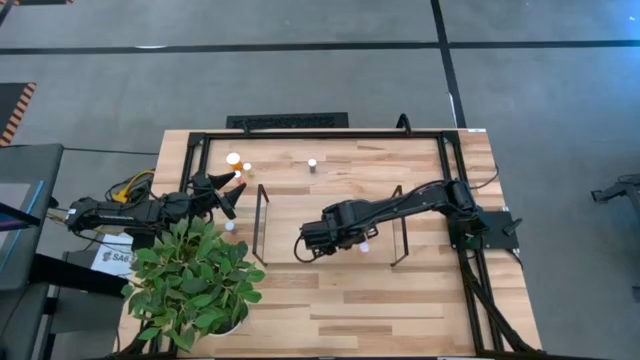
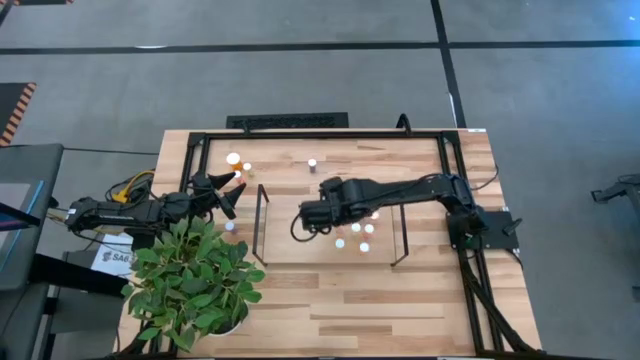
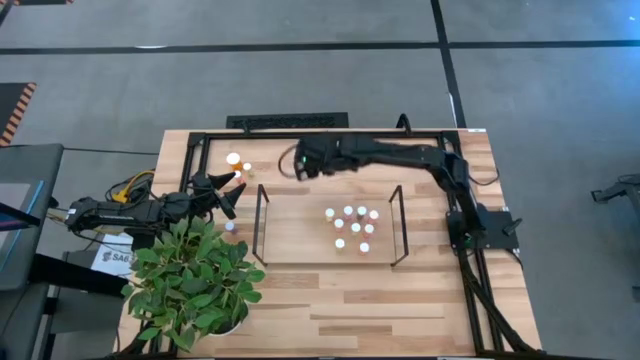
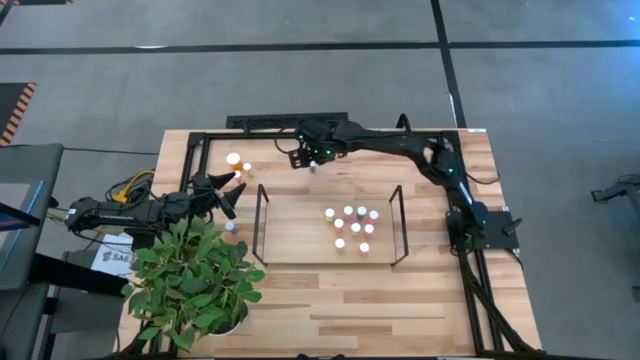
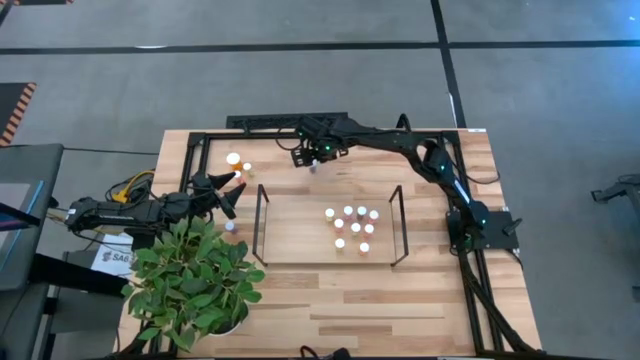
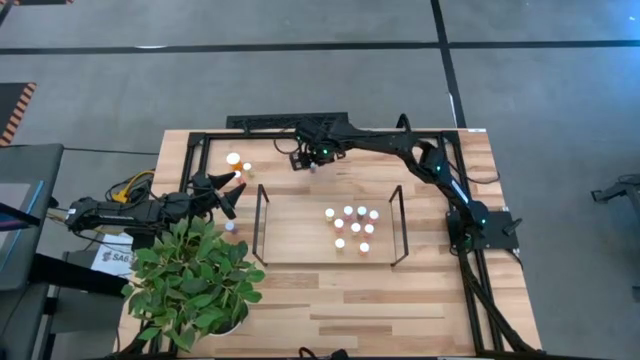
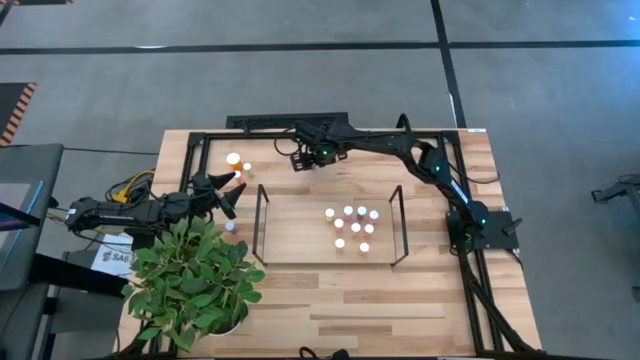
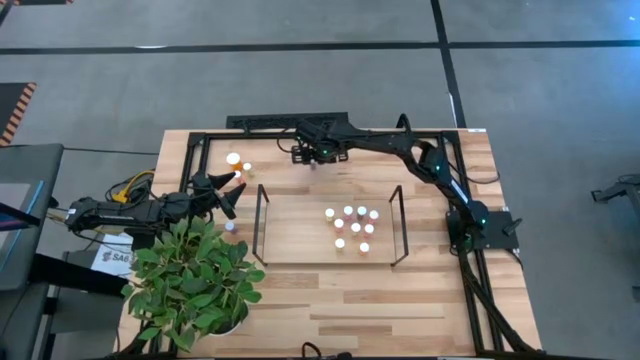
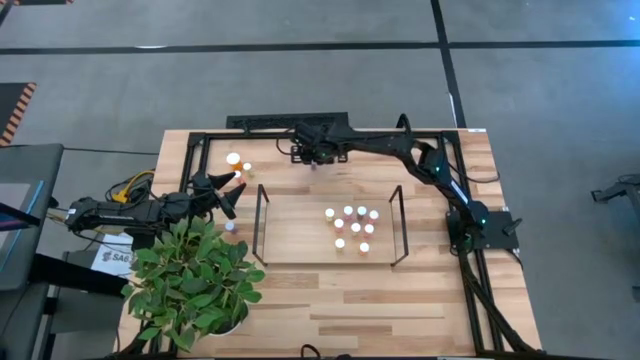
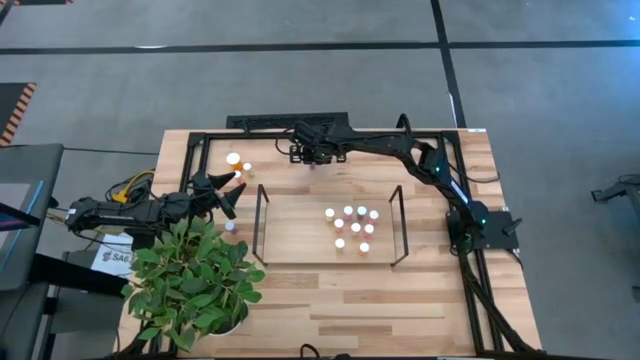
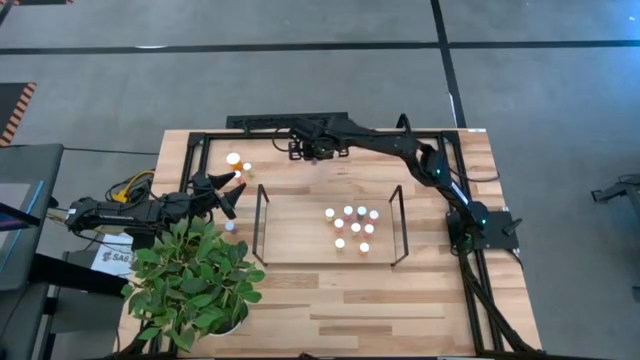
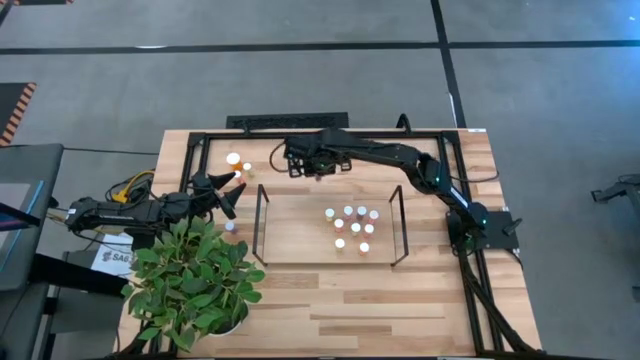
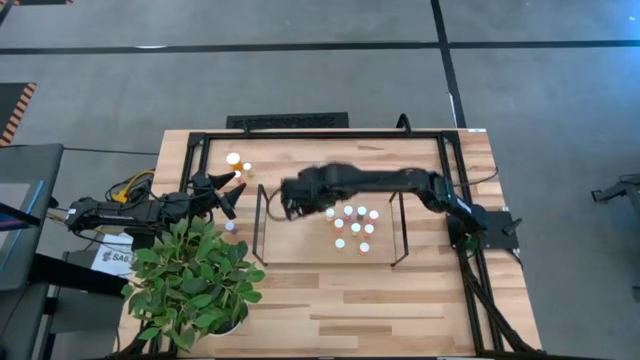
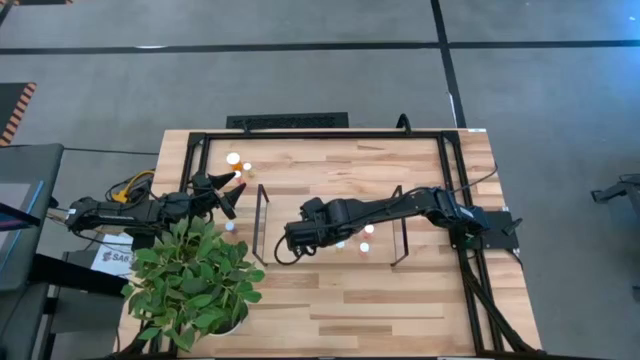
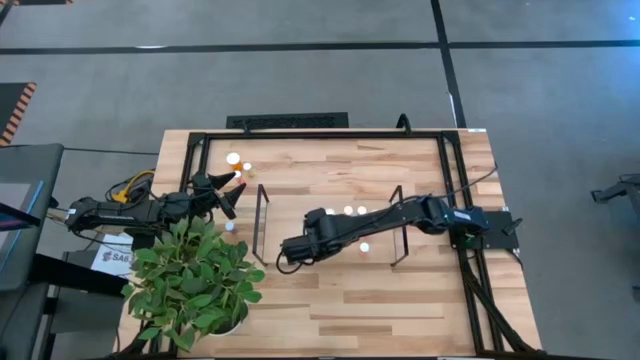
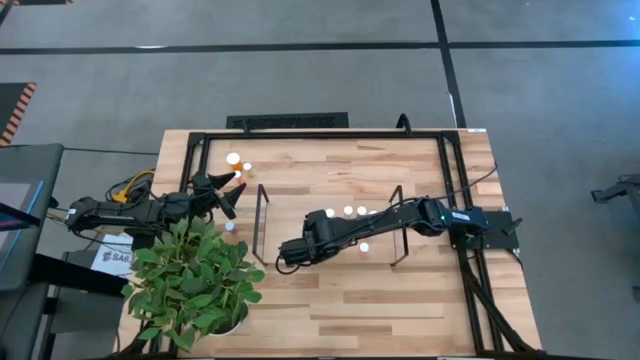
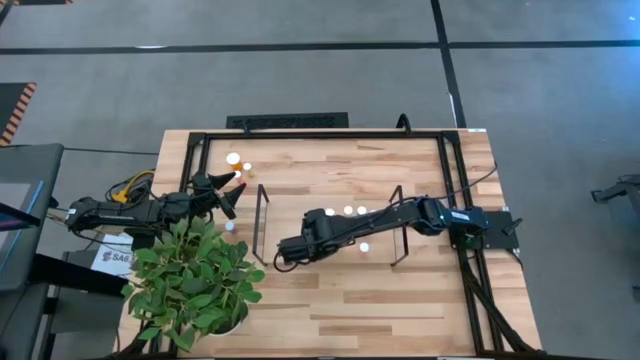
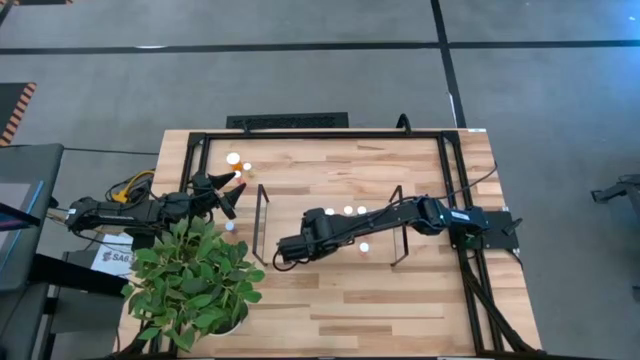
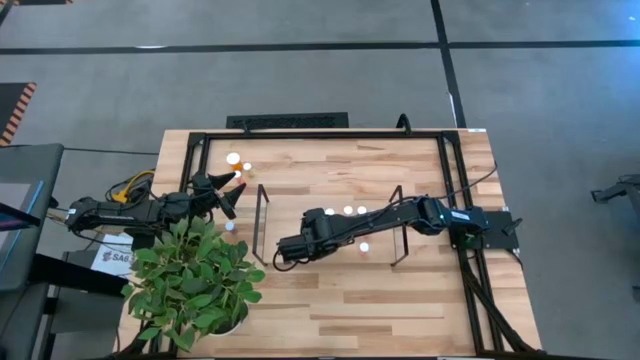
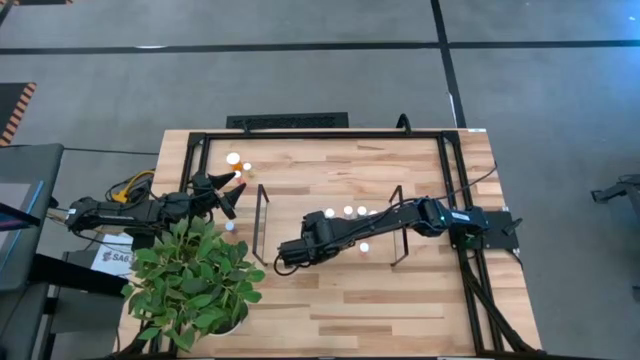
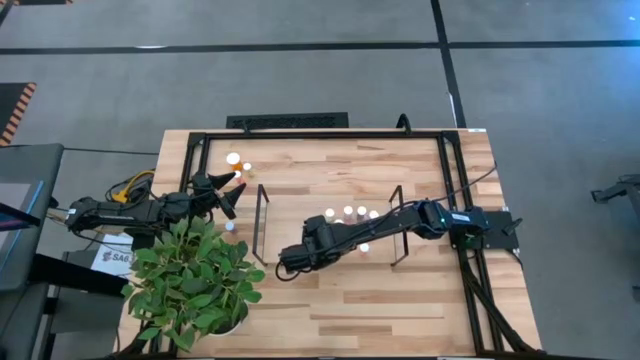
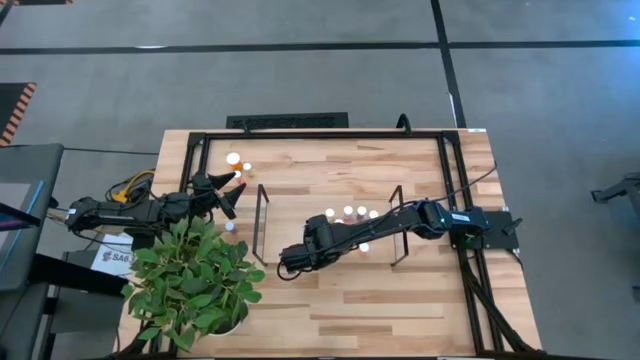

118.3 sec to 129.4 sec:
Task: Pick and place medicine bottles onto shelf by color
Put the blue pill bottle on the shelf

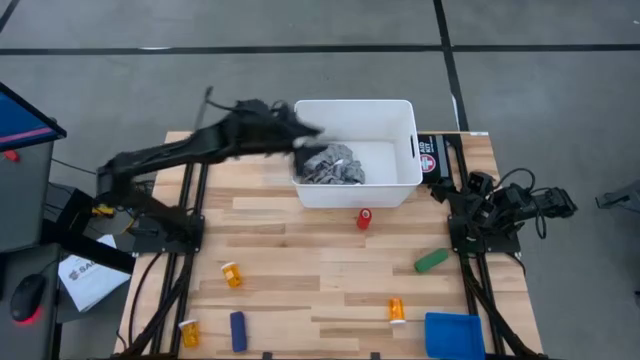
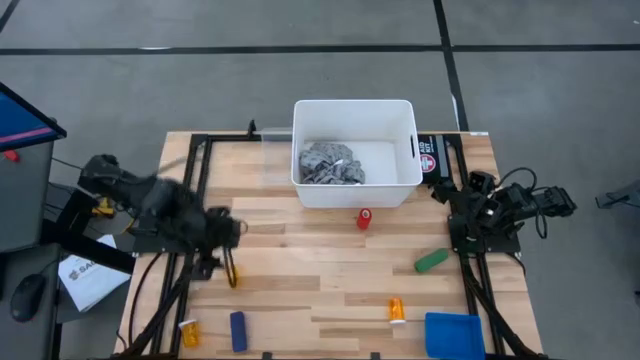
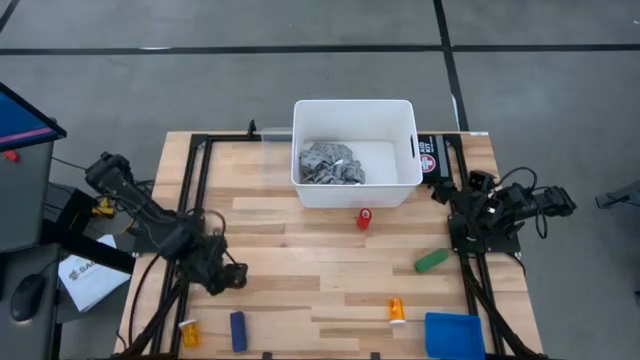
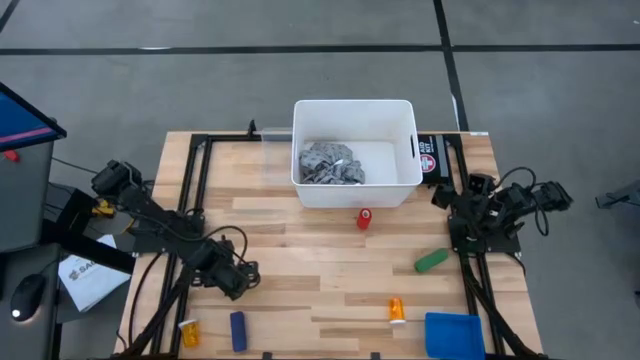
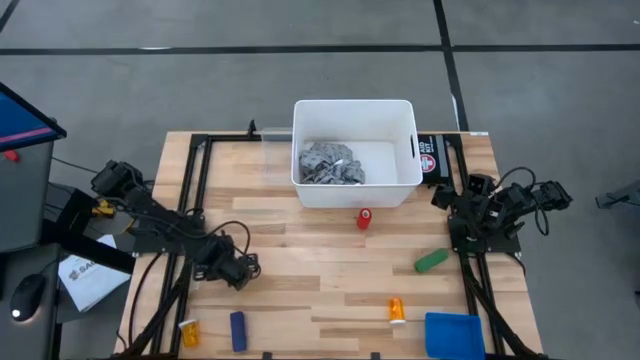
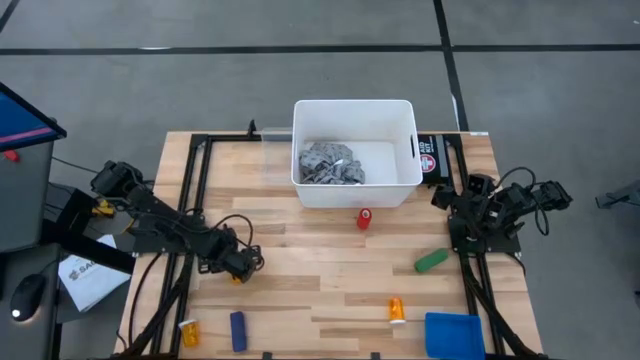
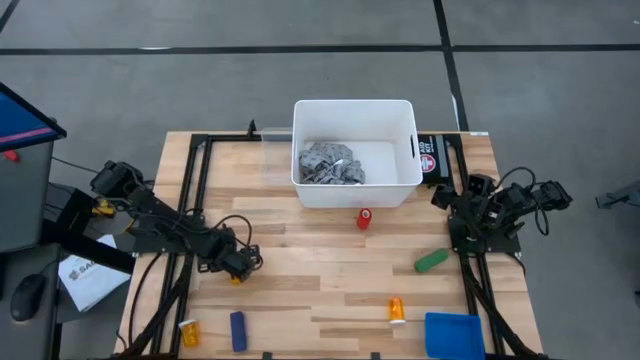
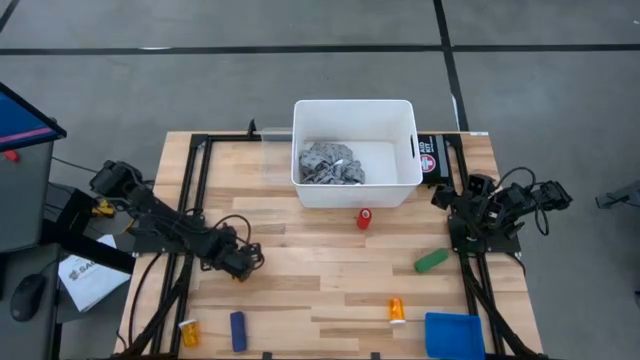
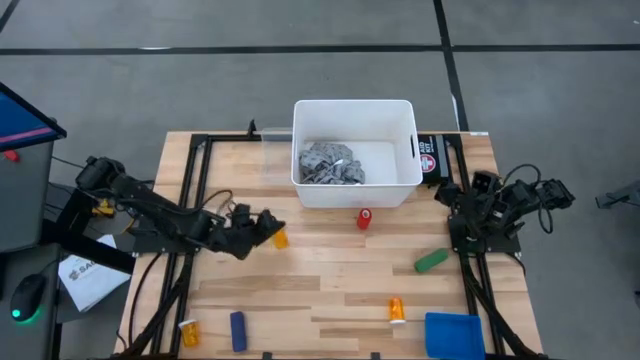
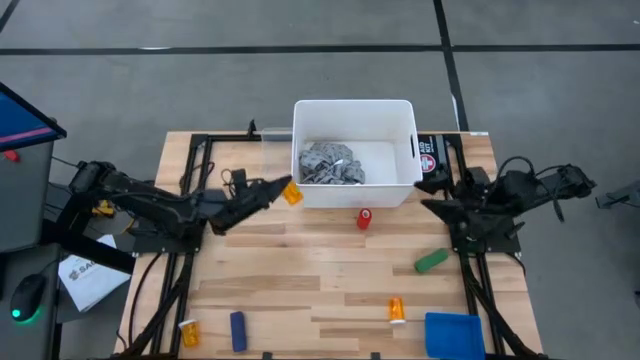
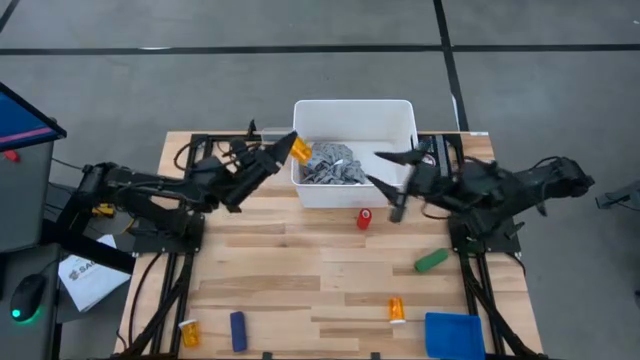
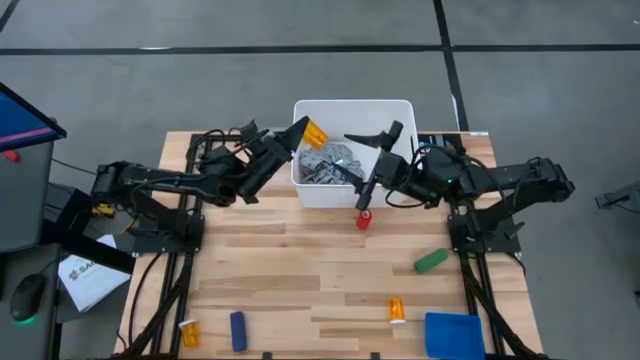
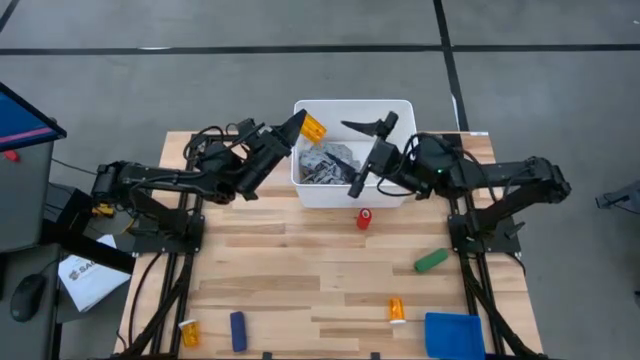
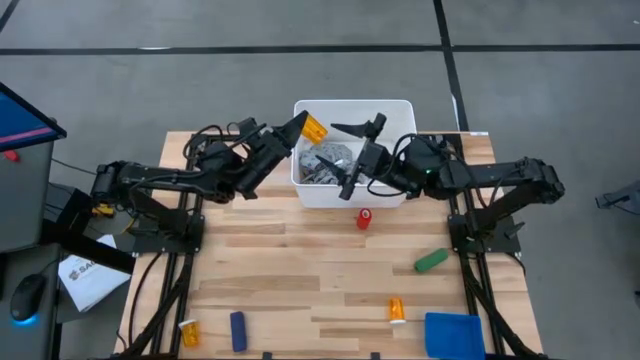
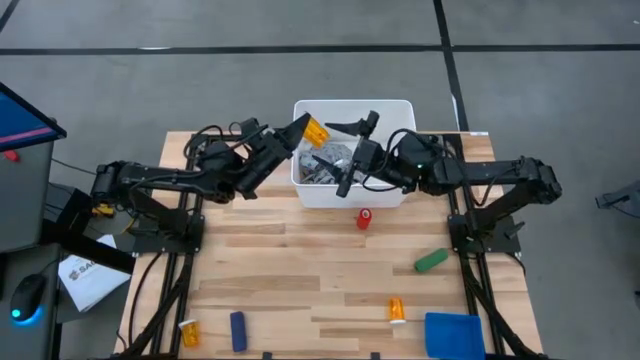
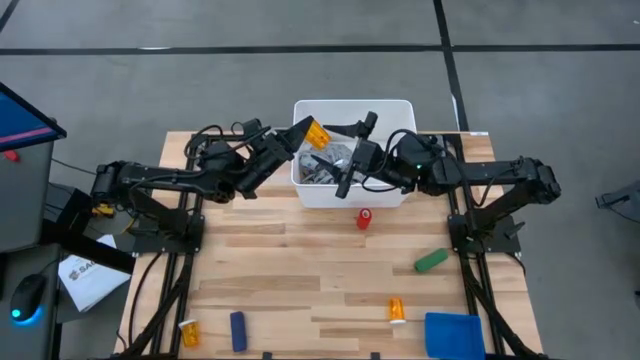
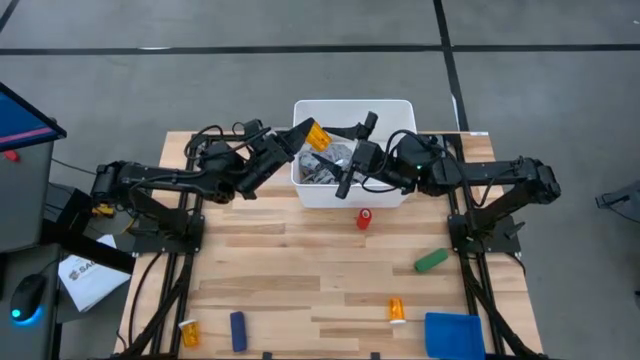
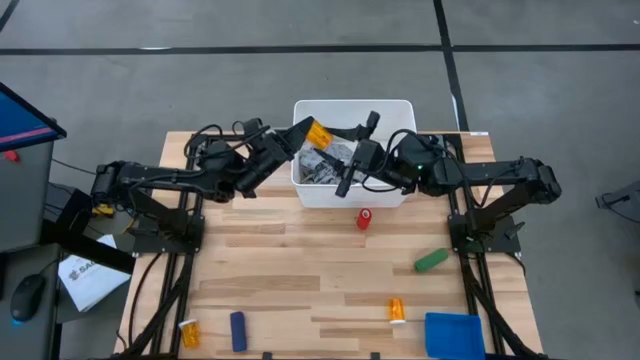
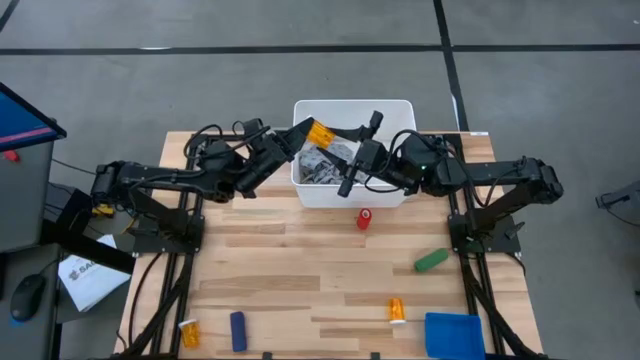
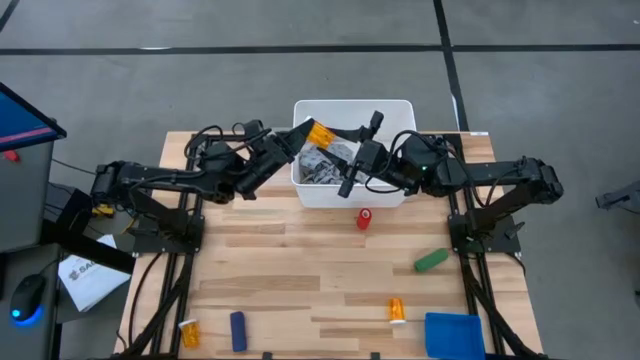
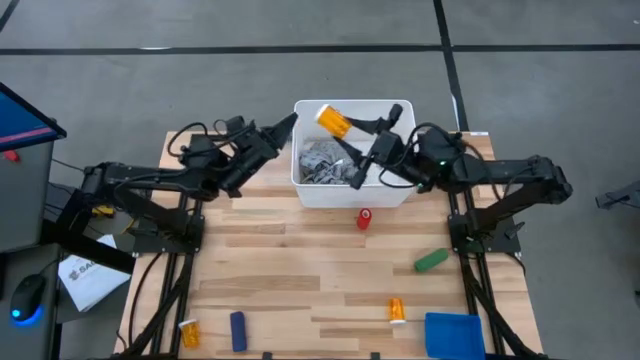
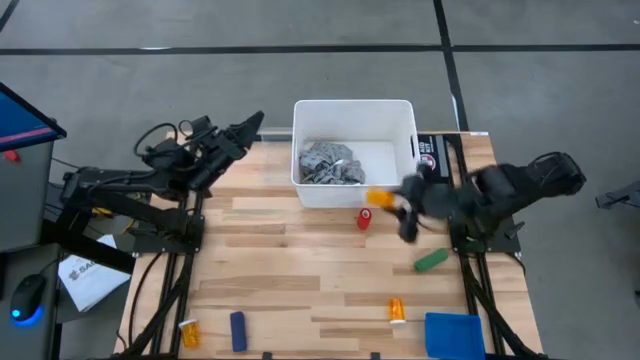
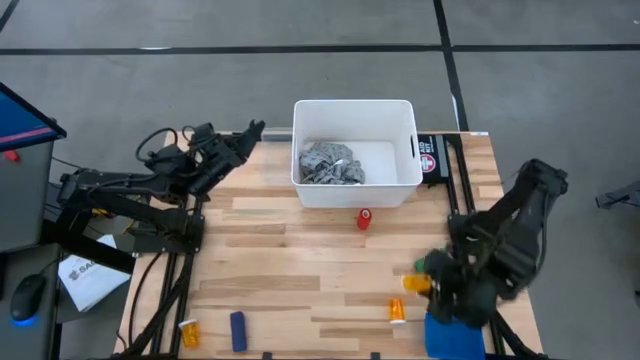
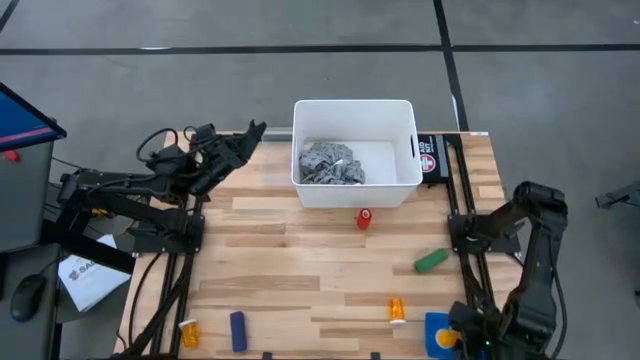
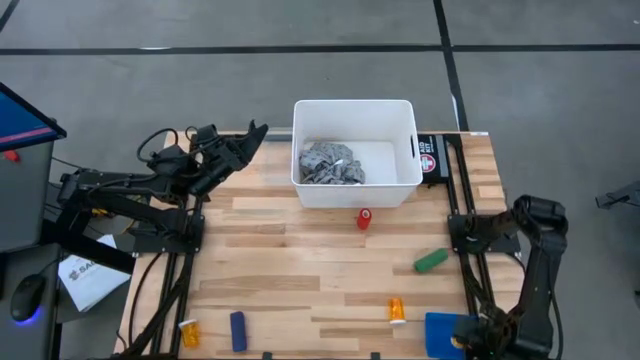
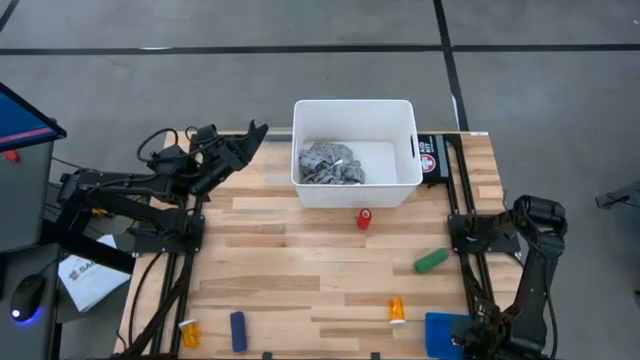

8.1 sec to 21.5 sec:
Task: Pick & Place Medicine items
Put the top right orange pill bottle into the blue bin
